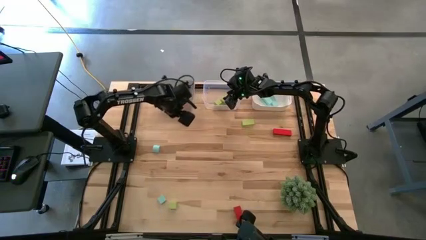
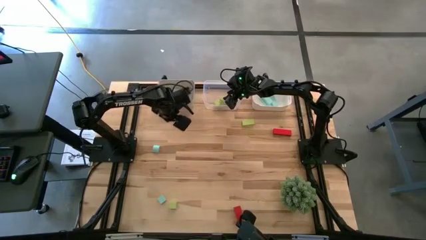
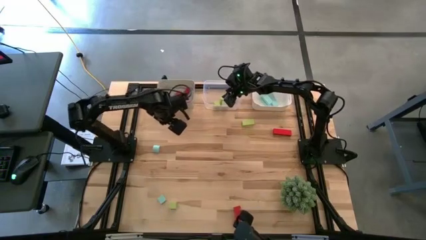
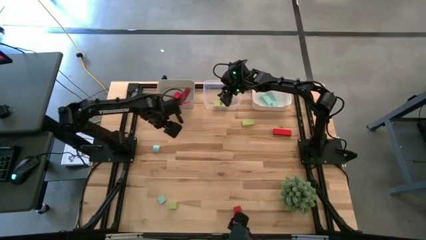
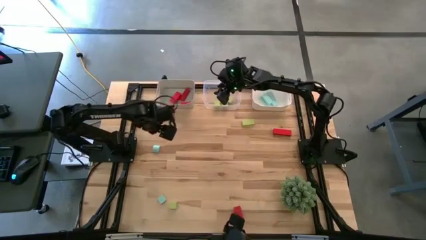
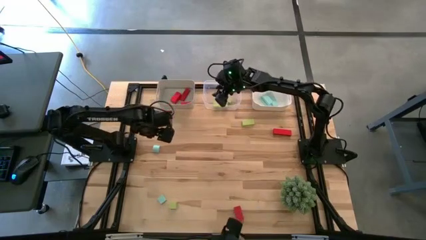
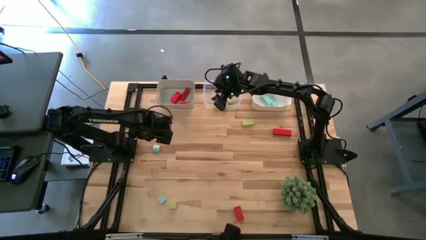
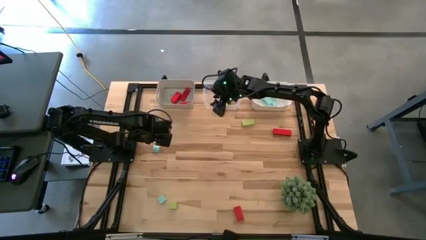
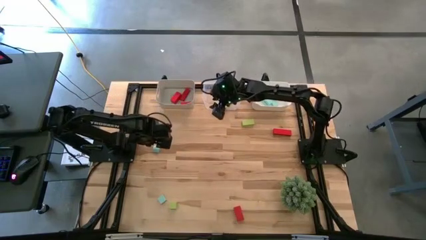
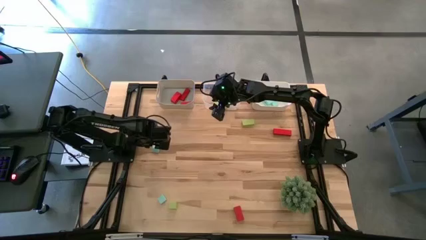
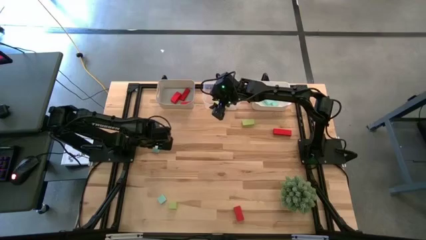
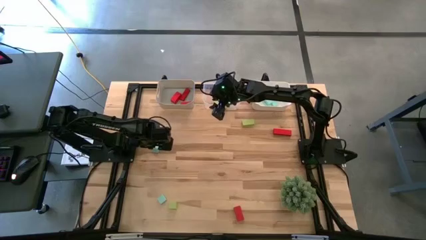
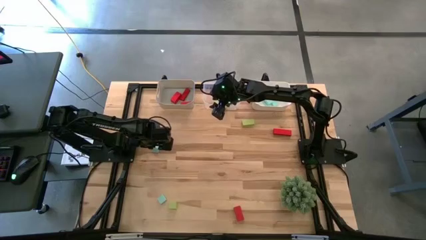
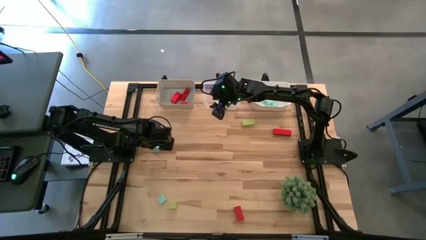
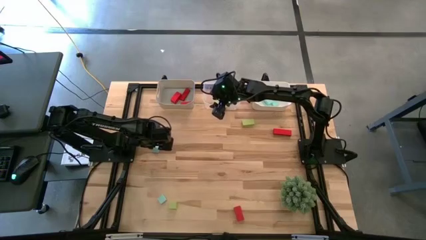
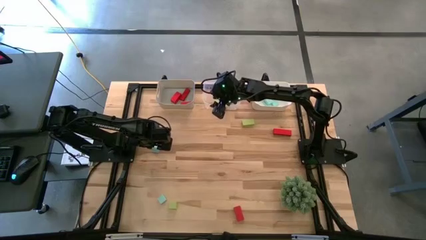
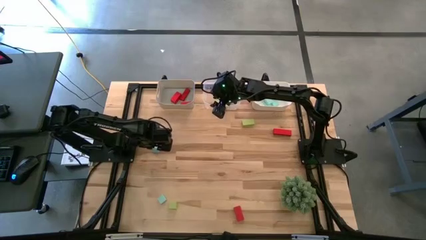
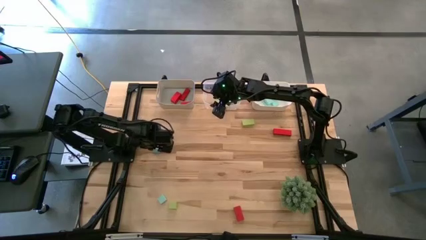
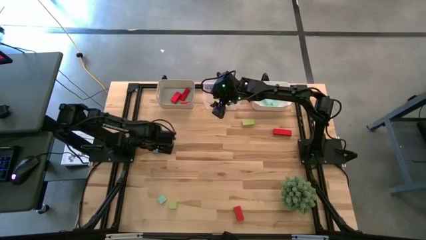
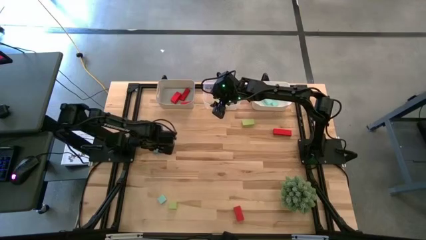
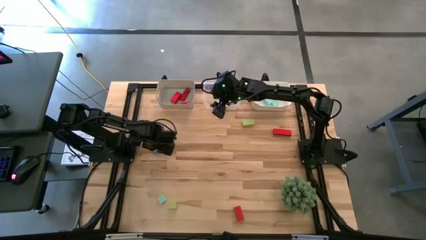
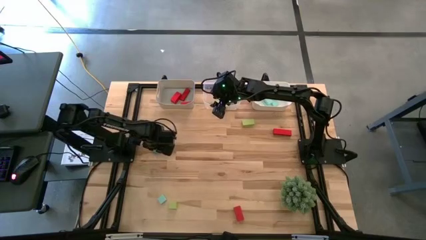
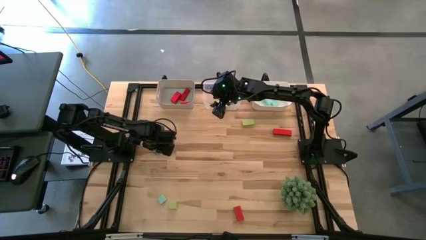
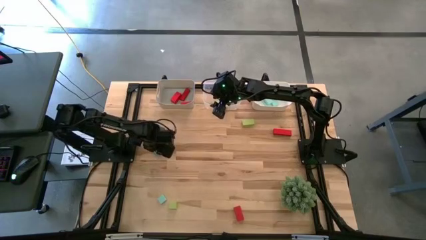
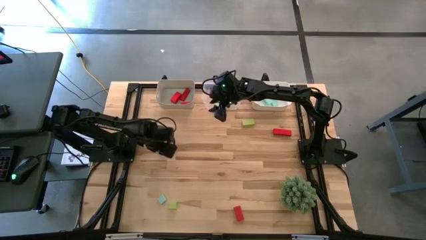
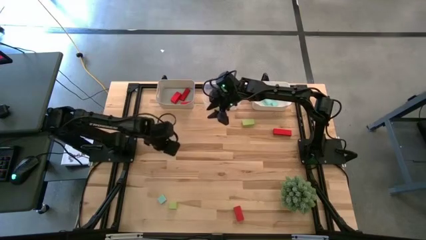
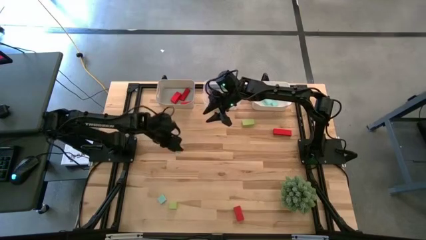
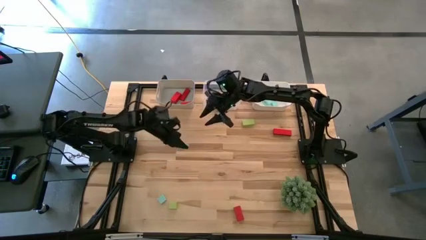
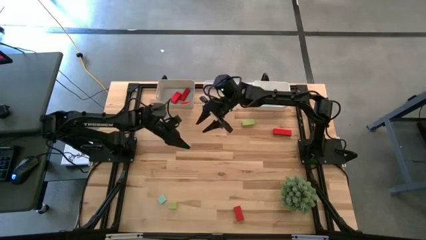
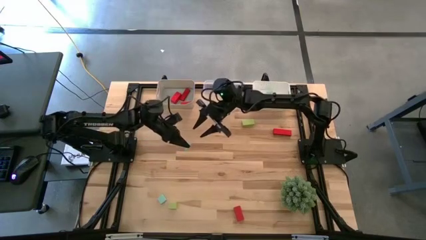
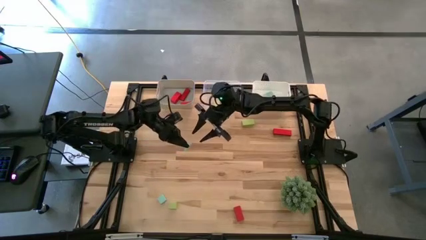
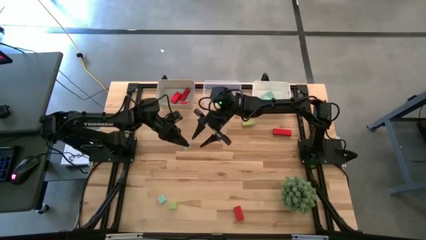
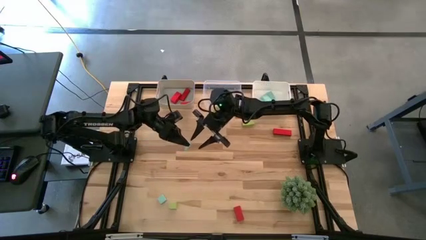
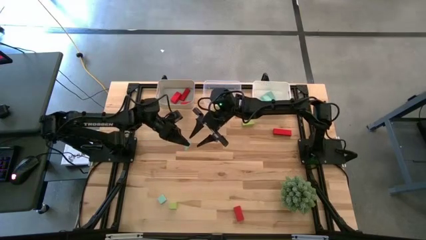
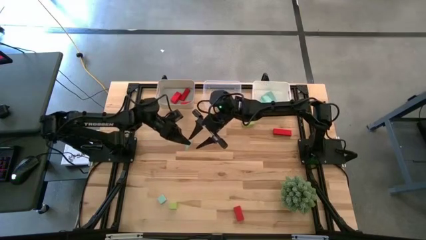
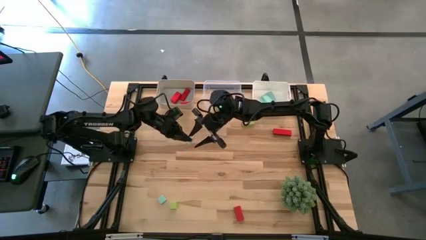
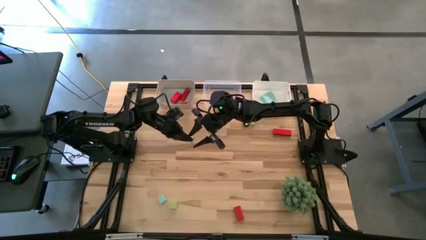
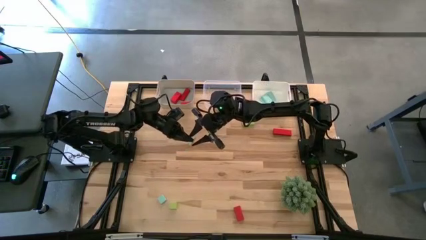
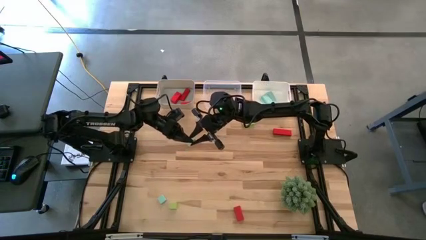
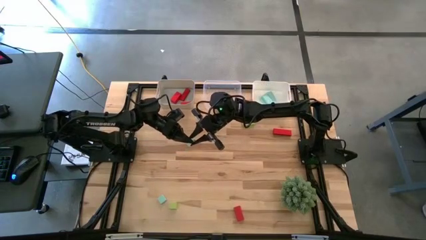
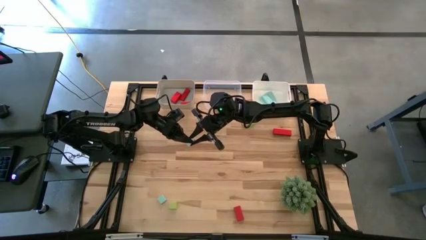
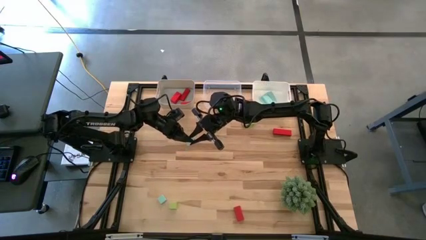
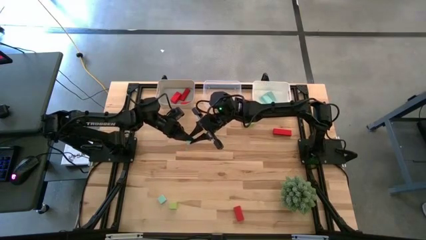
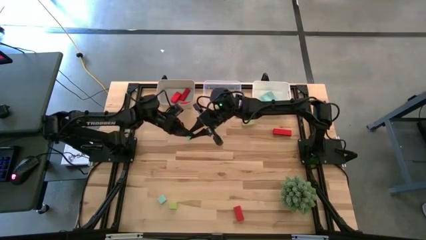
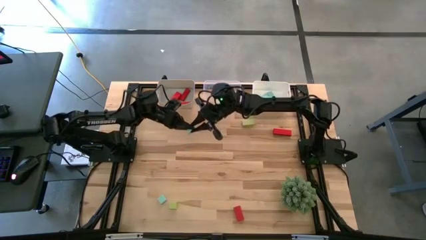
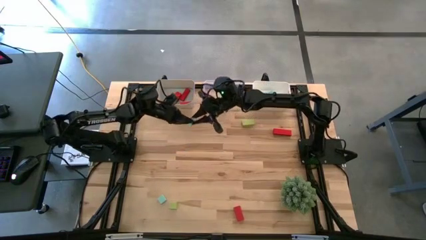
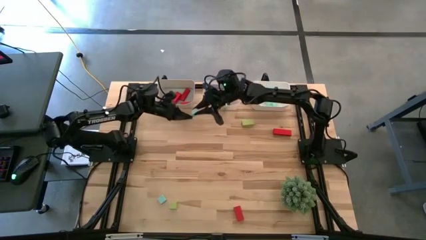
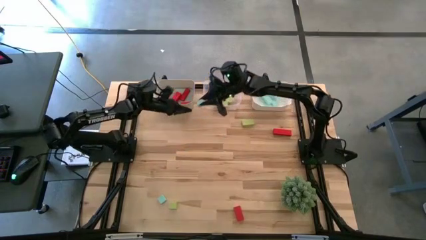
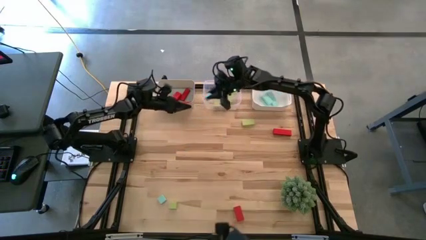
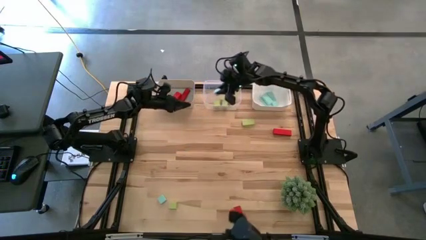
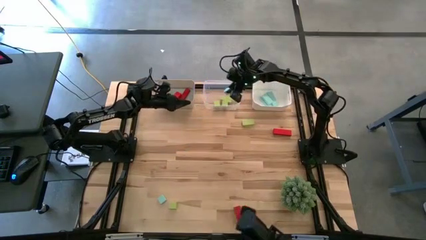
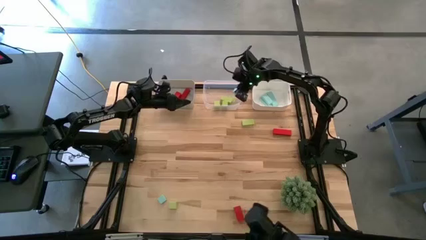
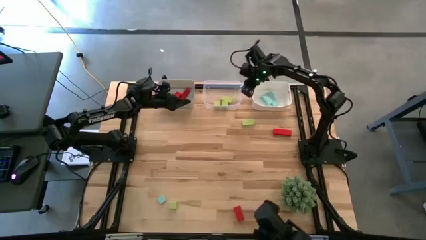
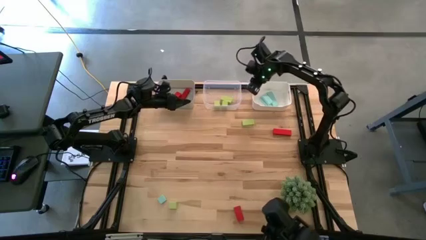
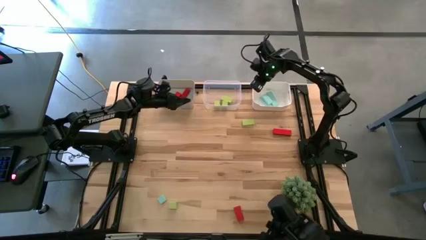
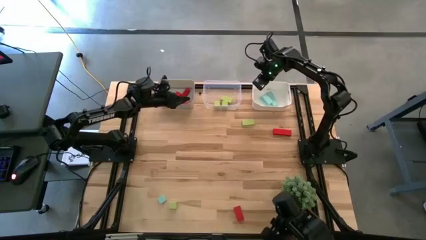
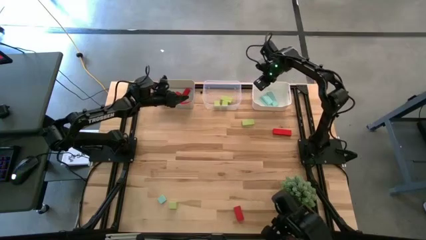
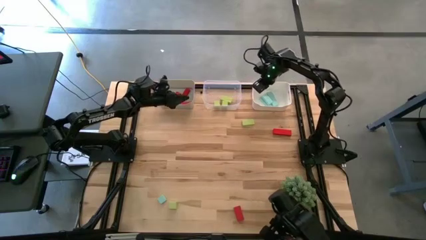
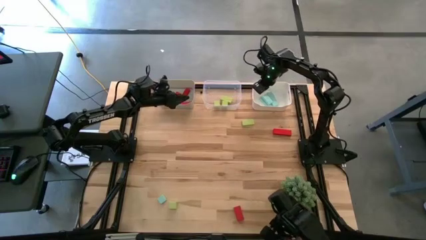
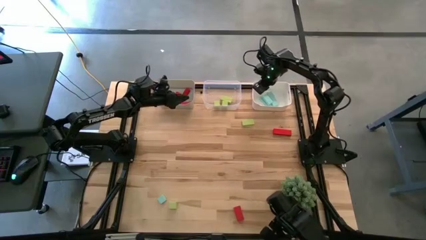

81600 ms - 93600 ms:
Task: Sort & place blocks by color
Put the blue block into the white bin

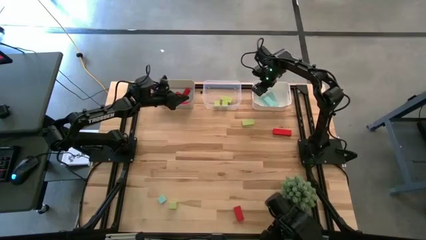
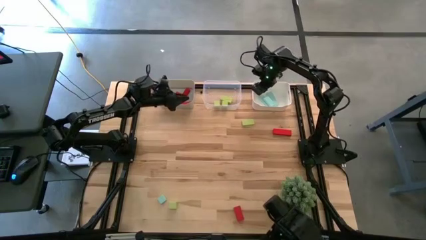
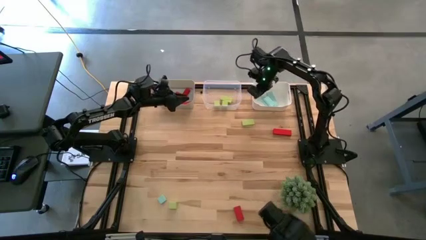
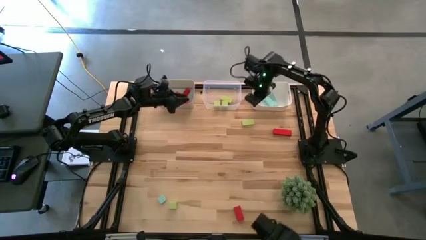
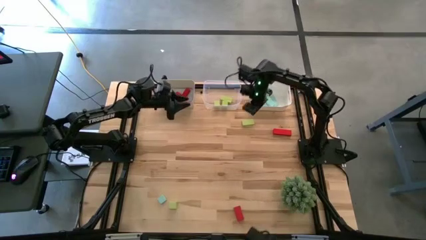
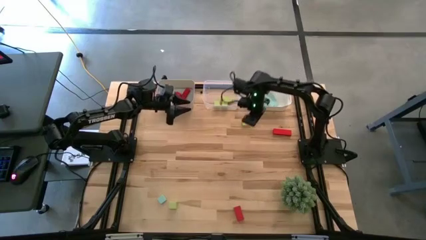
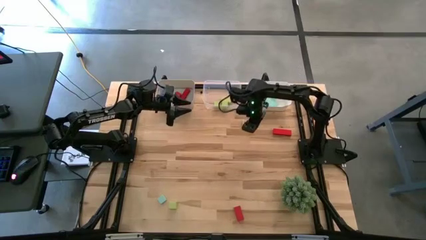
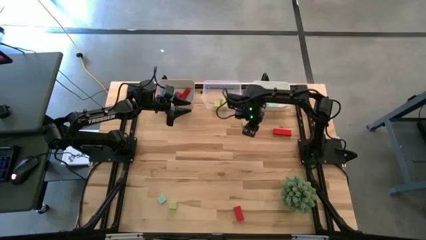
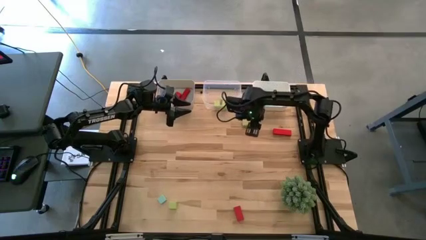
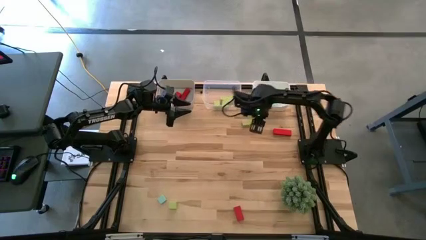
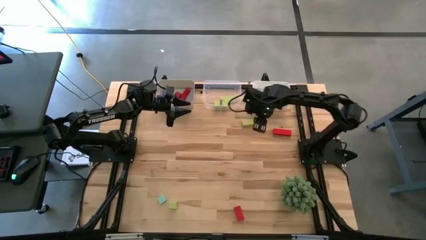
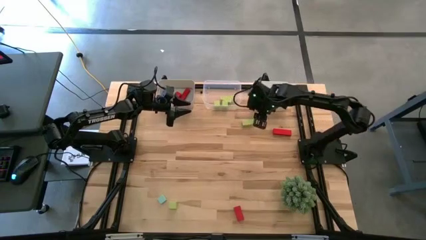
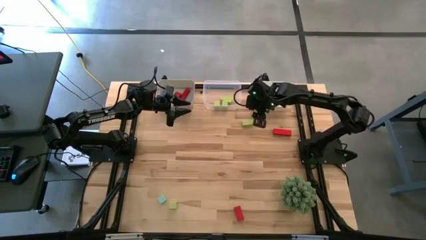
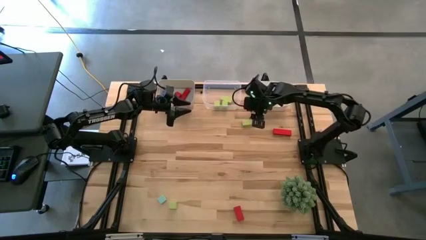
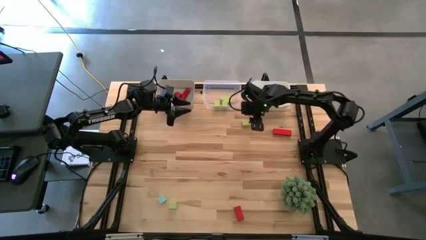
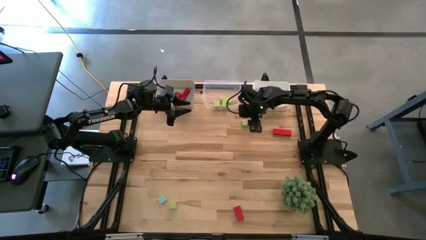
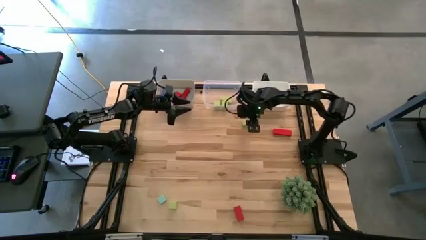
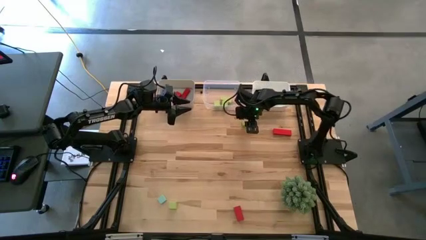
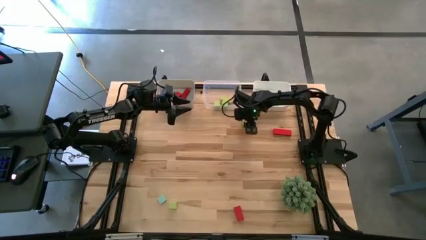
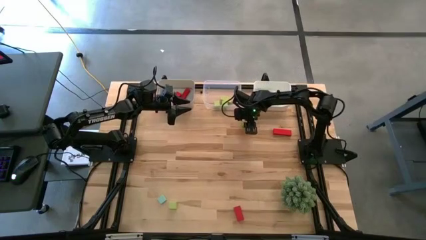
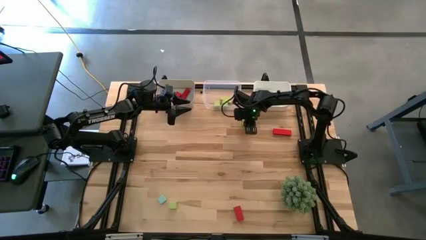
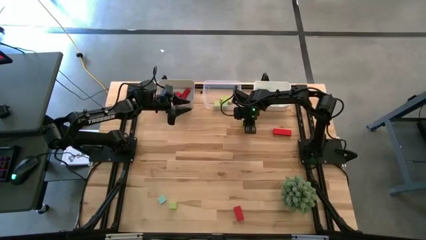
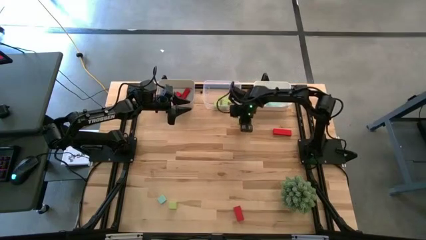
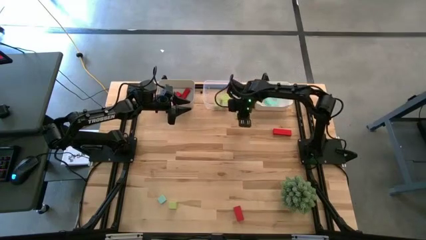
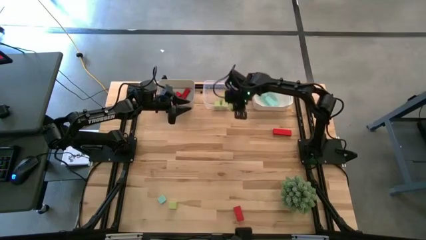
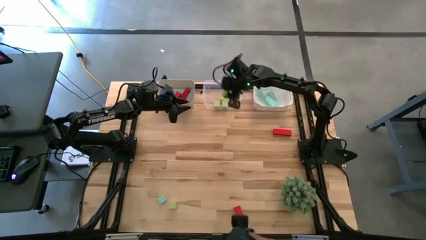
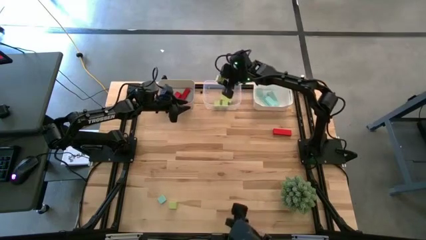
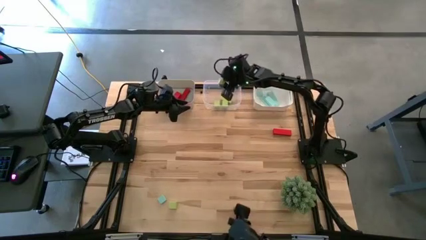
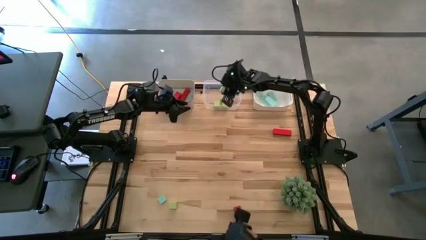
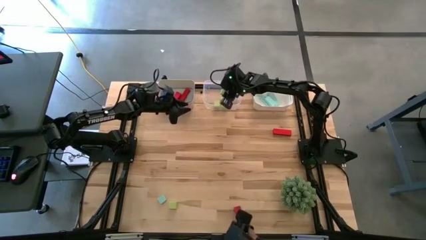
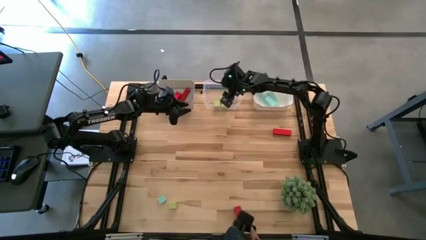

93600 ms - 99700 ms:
Put the green block into the transparent bin
